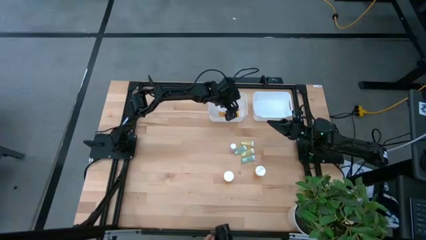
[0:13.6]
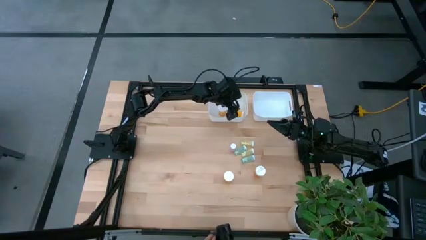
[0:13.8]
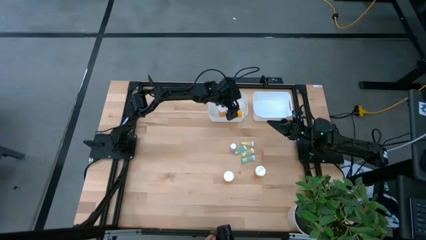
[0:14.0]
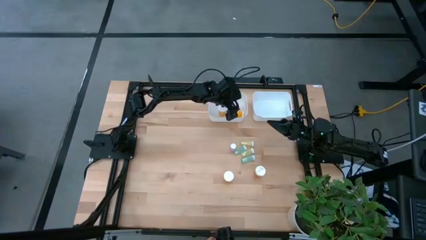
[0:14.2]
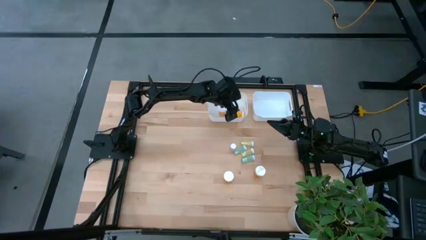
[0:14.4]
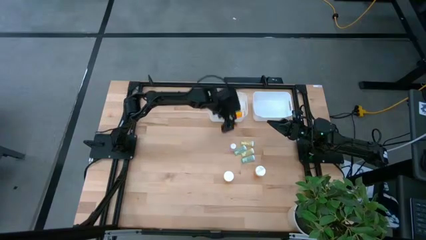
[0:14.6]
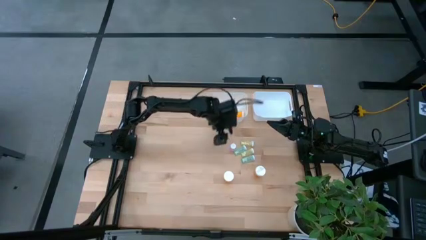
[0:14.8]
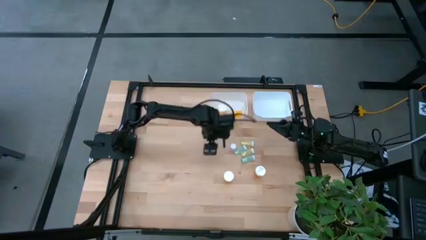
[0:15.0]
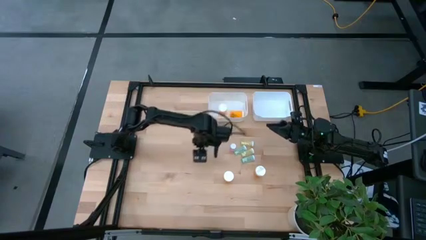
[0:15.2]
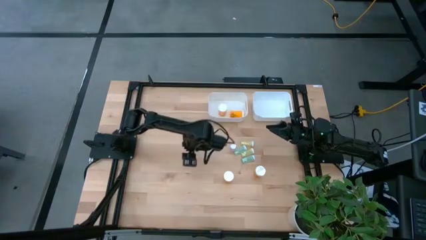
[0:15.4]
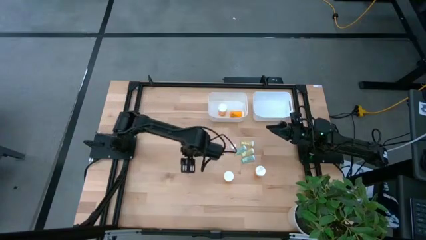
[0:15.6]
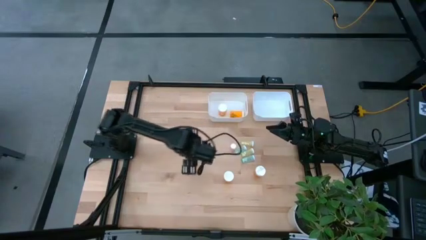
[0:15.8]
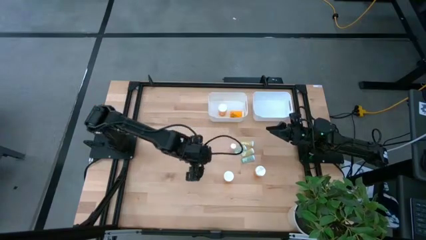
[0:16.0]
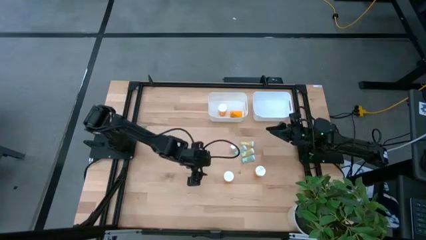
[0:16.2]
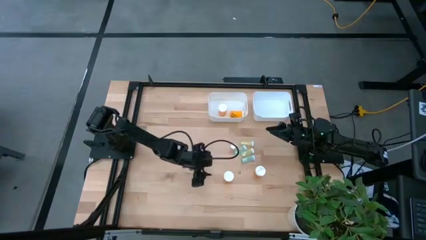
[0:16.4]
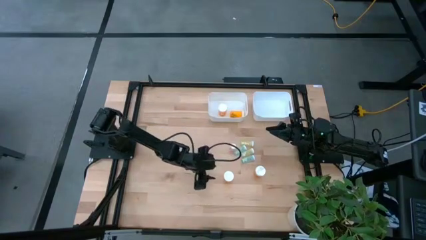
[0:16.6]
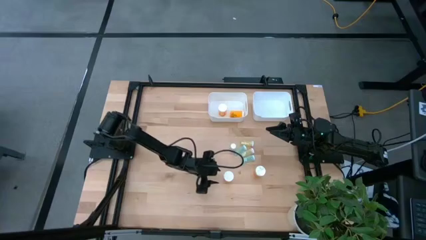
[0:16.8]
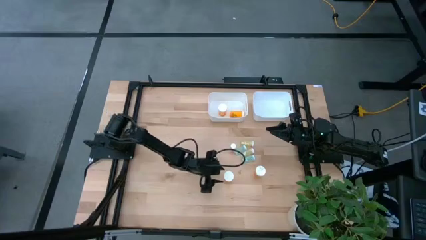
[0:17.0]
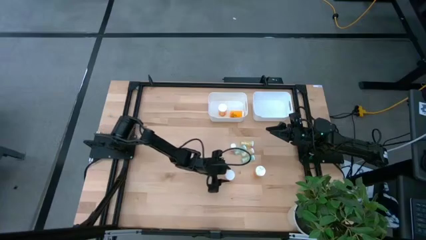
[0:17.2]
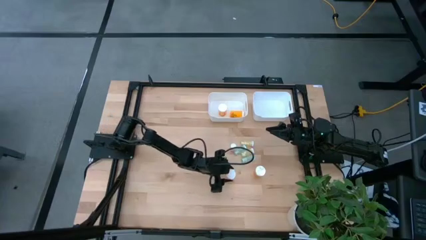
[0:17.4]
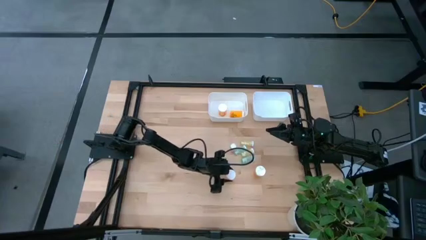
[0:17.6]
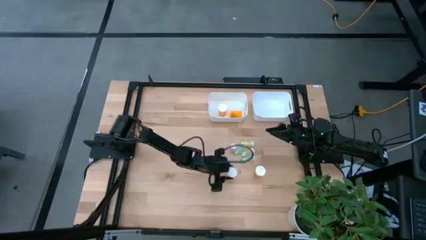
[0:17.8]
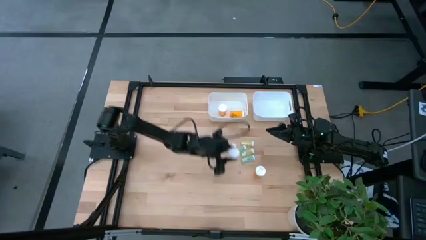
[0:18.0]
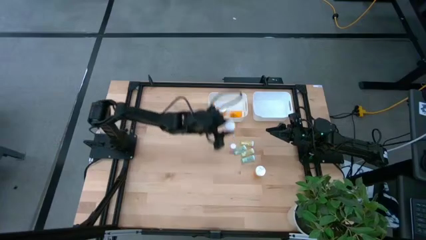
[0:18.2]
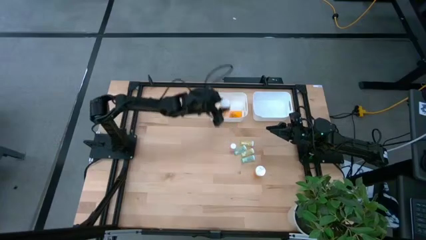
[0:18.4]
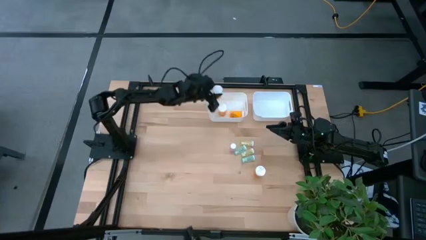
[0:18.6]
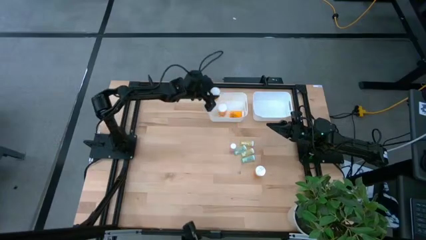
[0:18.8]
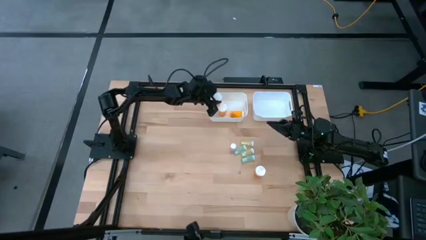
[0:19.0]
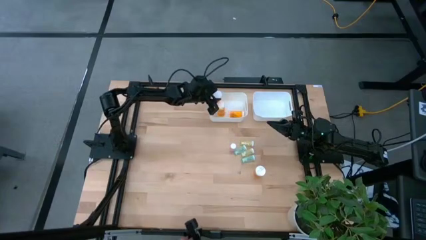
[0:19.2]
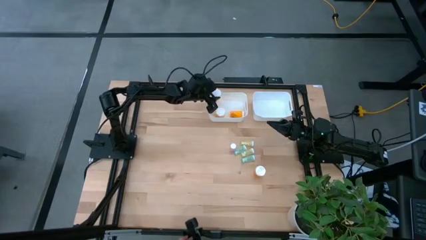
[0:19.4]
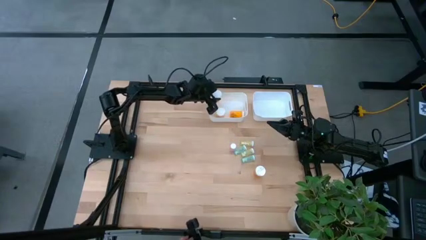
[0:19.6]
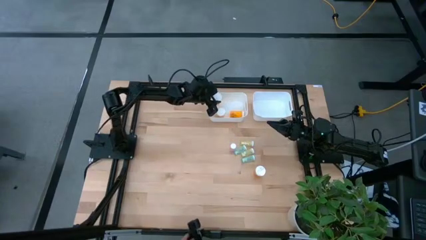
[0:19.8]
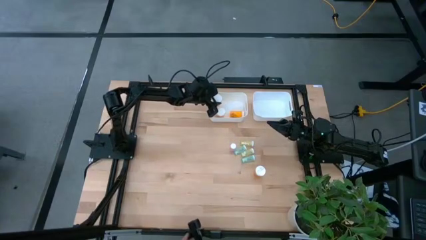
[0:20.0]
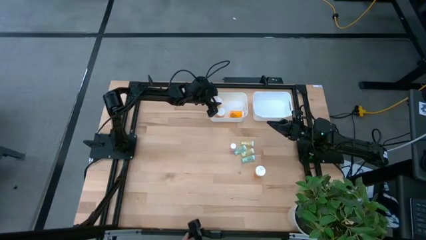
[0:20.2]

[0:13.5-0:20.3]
Task: Pick and place medicine bottles into bin by pill shape (circle, oval)
Put the orange capsule bottle into the left white bin

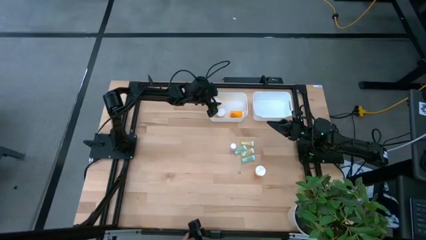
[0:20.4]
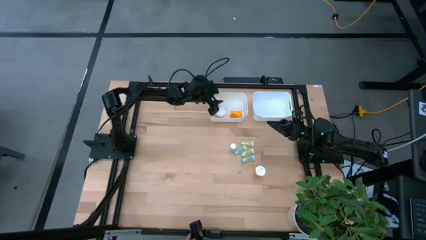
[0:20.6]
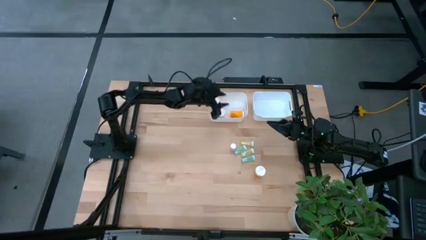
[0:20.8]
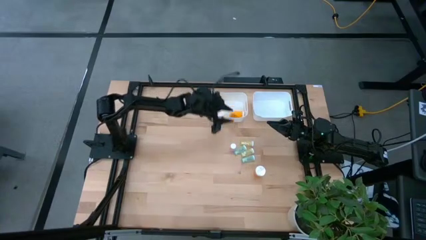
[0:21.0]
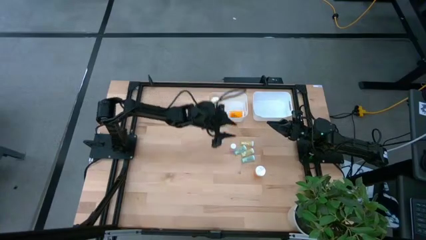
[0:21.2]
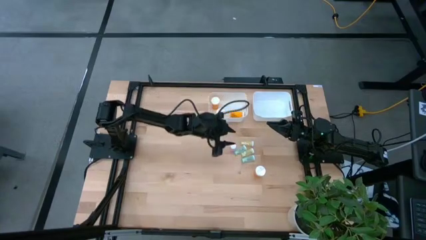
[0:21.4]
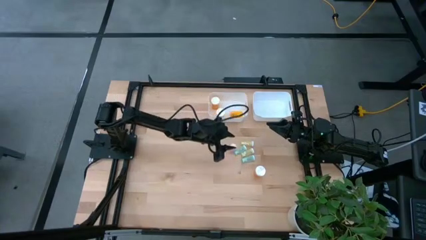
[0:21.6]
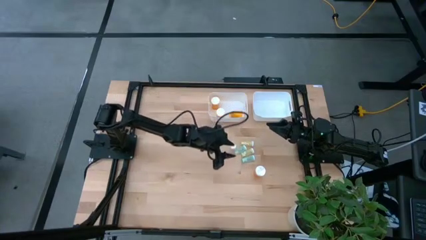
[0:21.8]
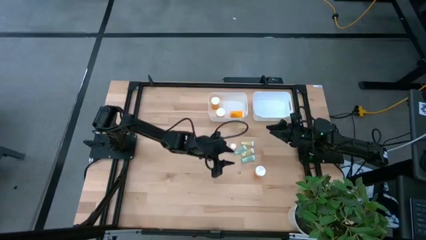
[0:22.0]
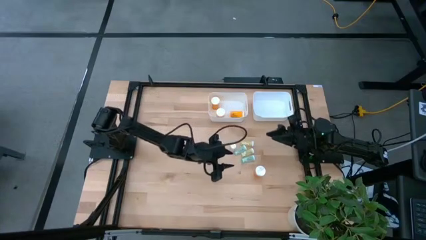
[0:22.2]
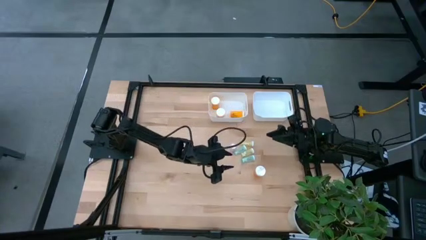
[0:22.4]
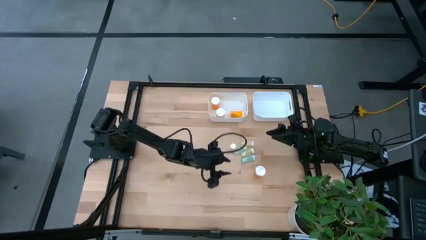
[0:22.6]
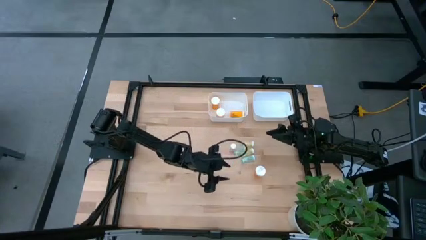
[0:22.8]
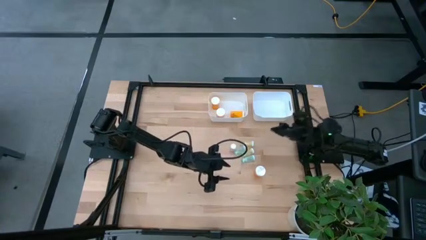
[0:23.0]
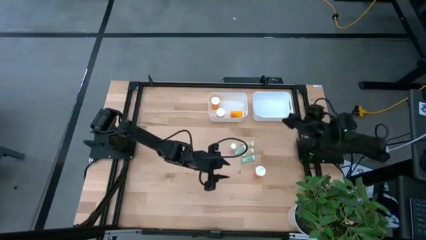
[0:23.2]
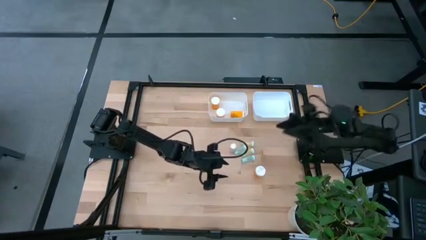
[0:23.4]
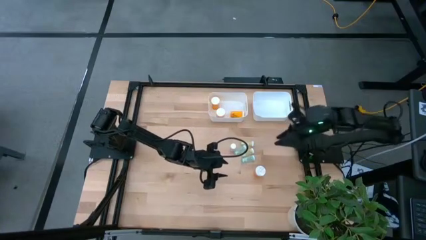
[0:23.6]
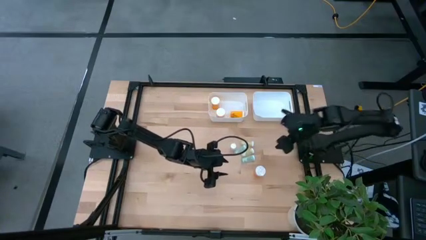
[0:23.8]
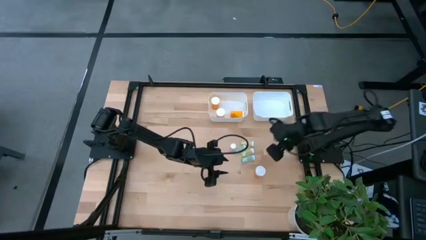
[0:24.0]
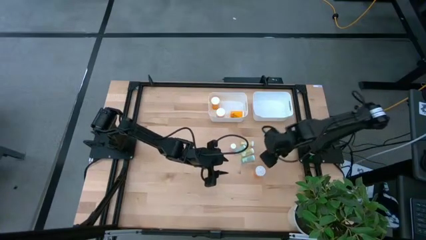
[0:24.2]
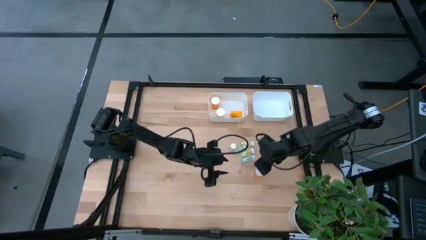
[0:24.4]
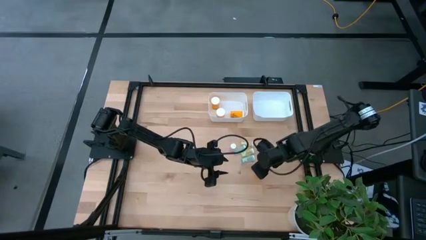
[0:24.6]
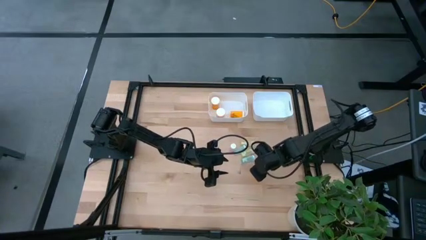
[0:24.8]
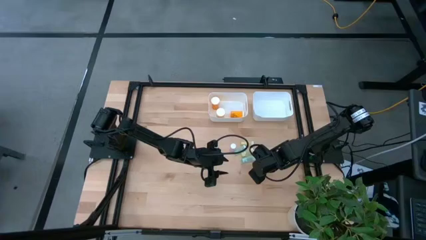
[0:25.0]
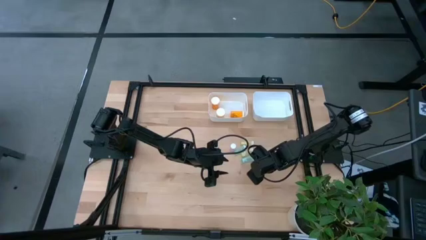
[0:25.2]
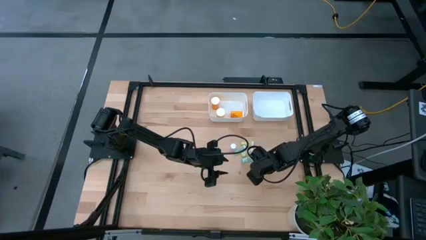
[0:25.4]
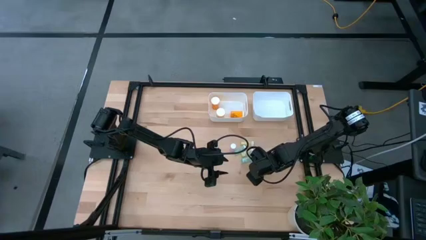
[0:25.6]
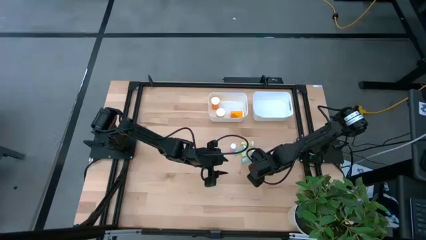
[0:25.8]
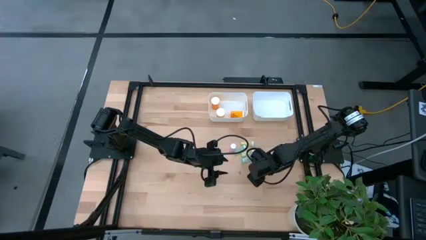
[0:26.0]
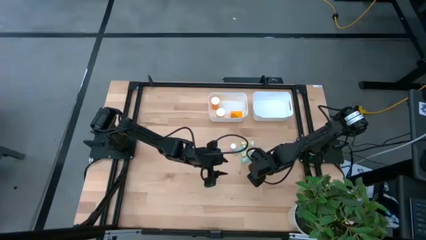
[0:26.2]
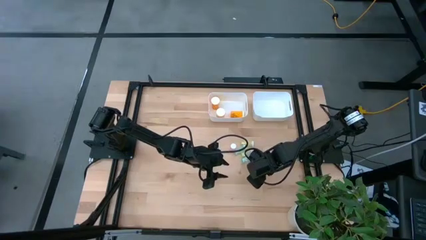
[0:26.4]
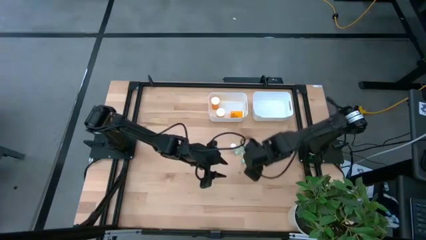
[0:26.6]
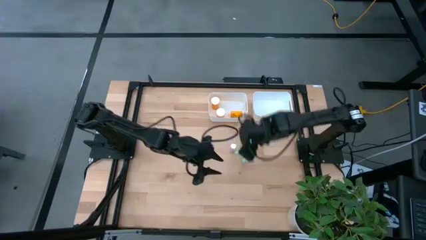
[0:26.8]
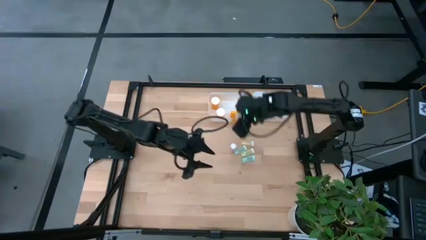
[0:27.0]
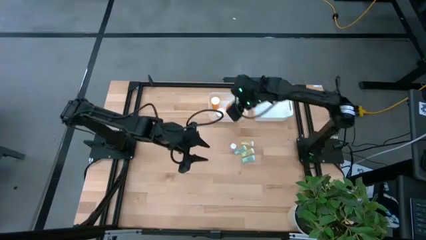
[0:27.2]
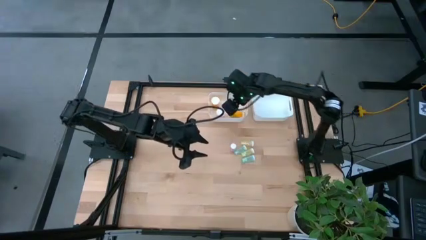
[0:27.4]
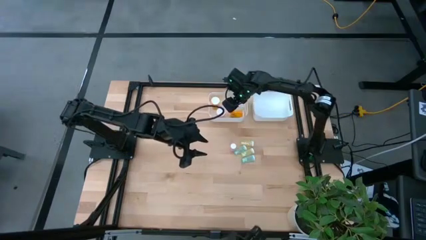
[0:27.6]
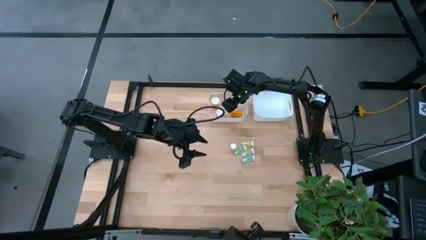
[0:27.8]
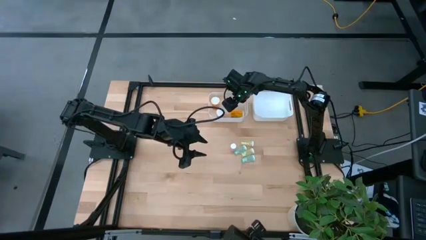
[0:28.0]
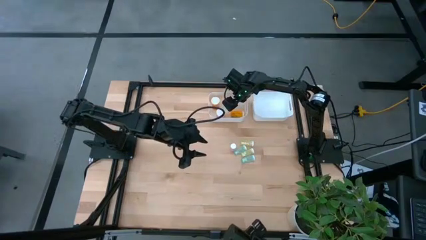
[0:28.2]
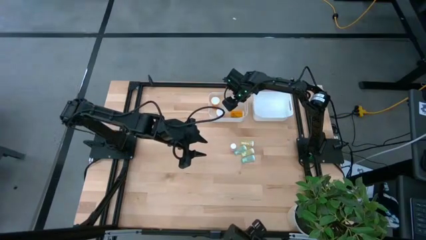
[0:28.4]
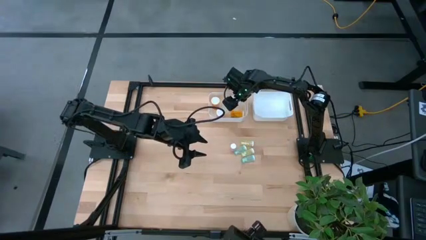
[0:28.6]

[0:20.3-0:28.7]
Put the orange capsule bottle into the left white bin

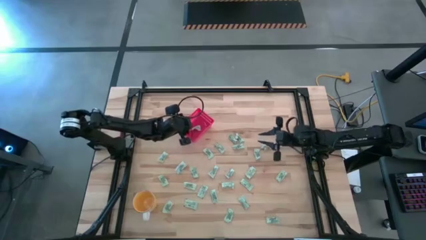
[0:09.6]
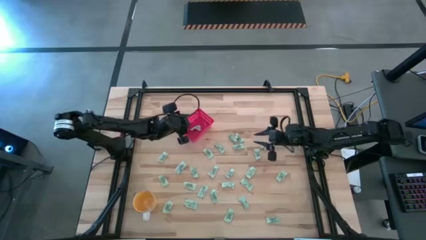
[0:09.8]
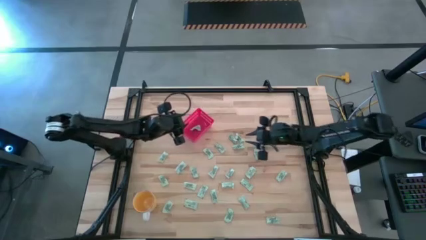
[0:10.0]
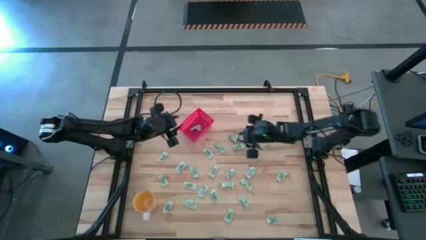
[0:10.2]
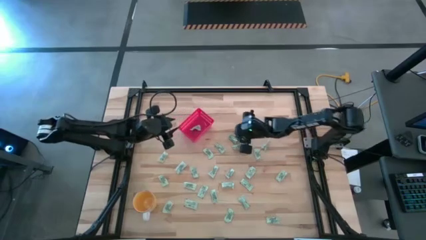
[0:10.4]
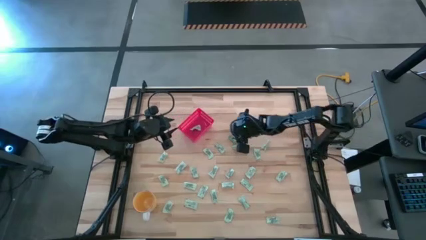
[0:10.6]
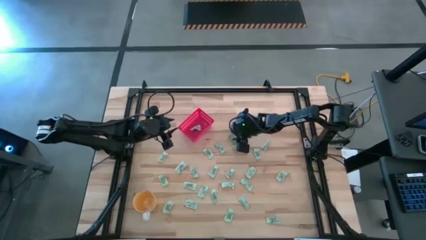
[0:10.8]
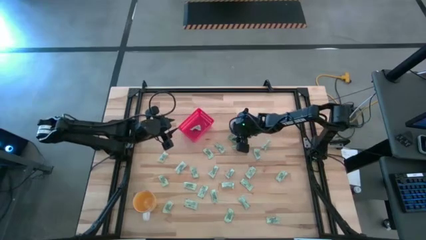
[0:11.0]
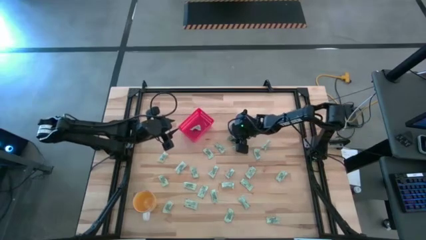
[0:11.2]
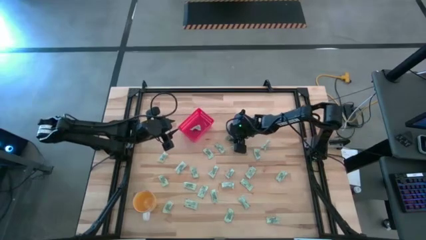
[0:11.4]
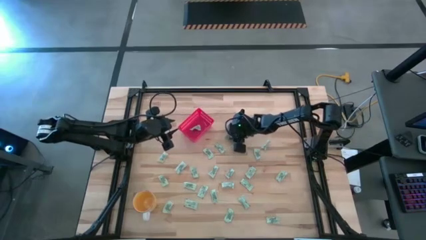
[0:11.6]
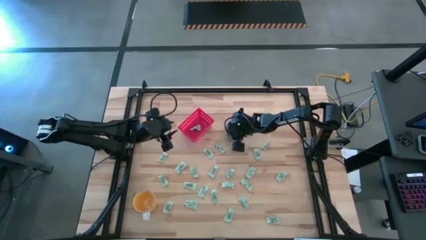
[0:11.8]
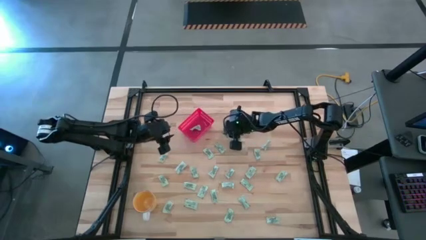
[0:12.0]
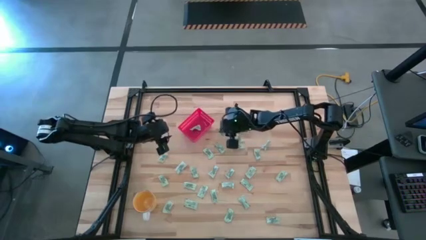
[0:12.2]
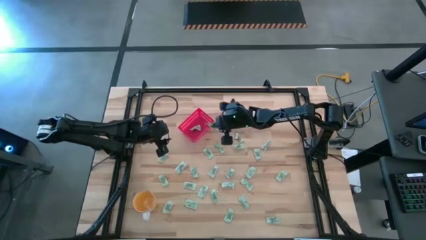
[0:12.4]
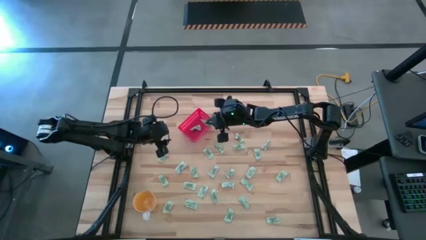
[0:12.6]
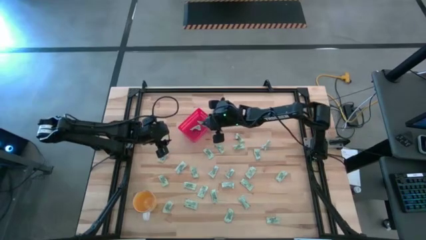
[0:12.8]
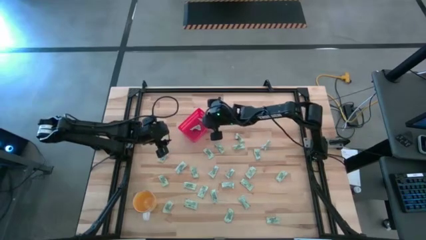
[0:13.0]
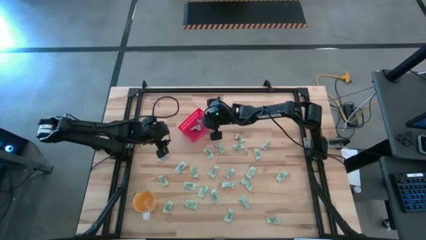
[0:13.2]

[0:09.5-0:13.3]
Task: Pick and place Stevia / Truvia into bins
Put the white stevia packet into the red bin
